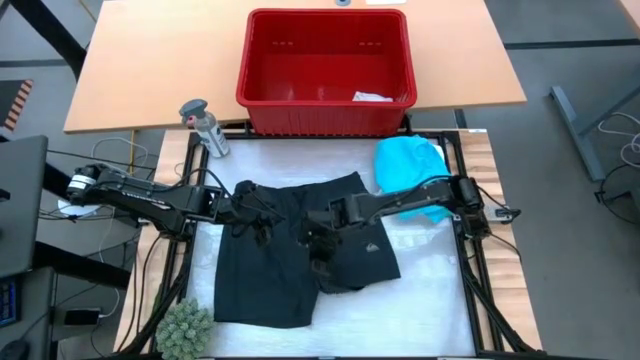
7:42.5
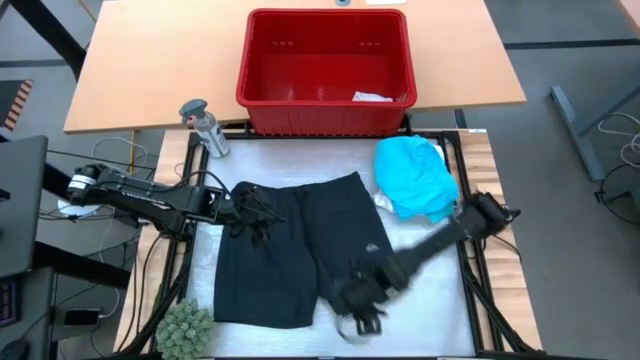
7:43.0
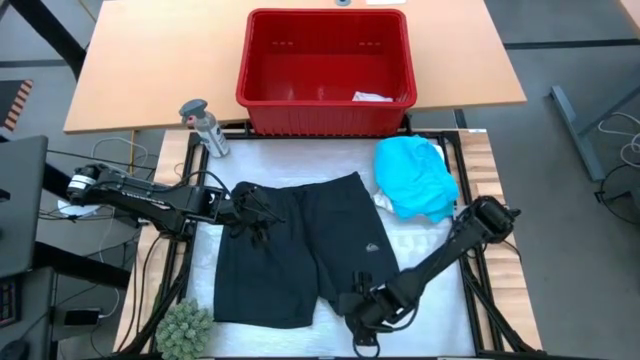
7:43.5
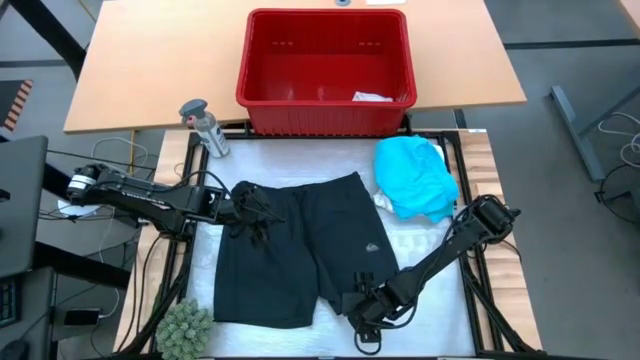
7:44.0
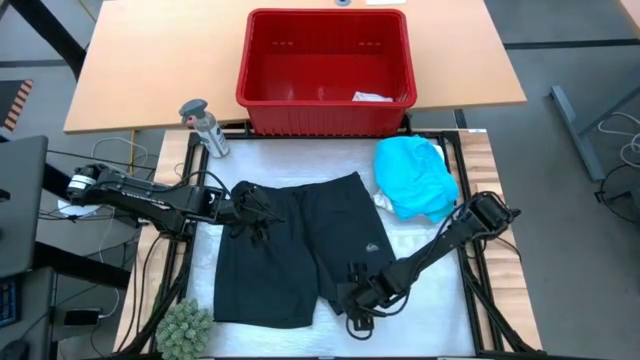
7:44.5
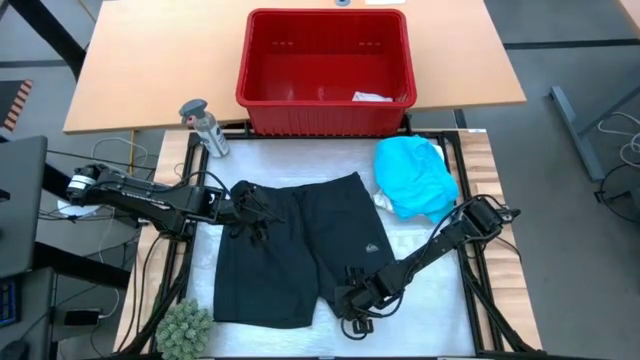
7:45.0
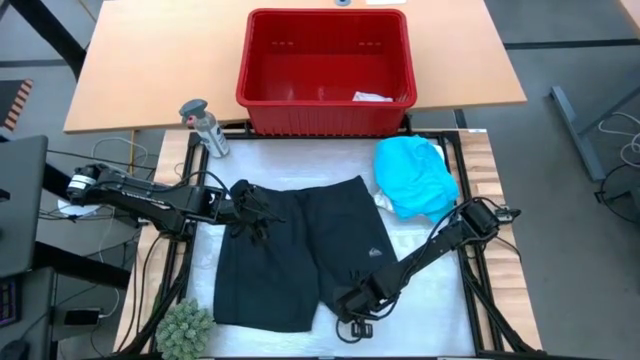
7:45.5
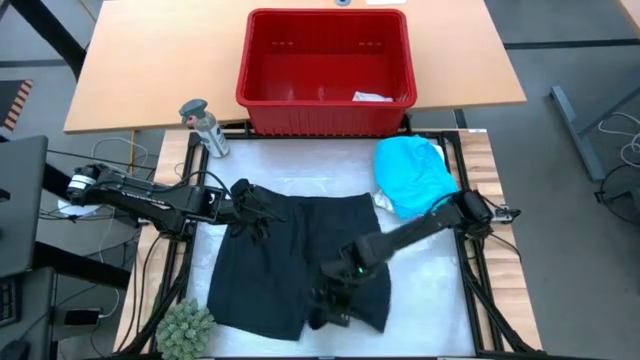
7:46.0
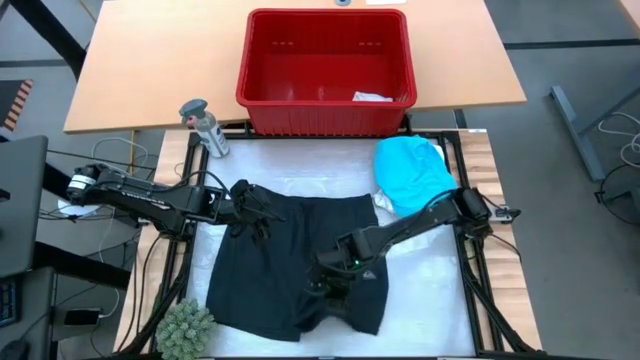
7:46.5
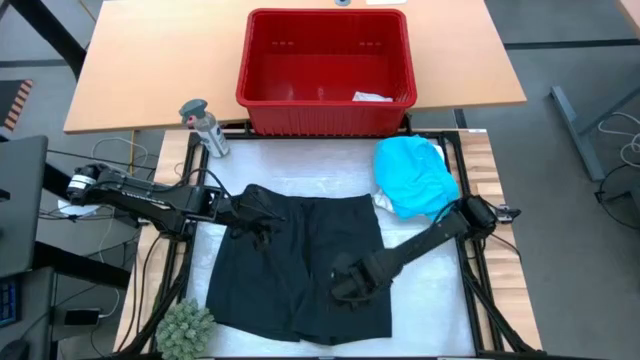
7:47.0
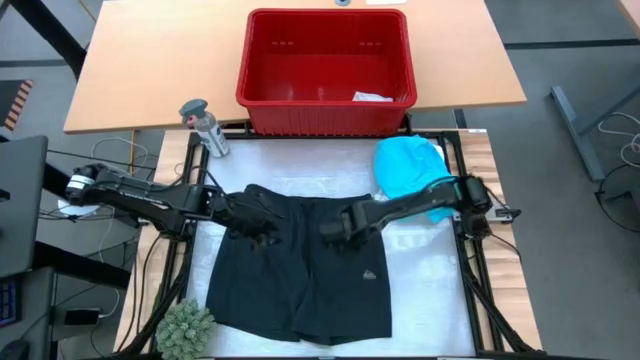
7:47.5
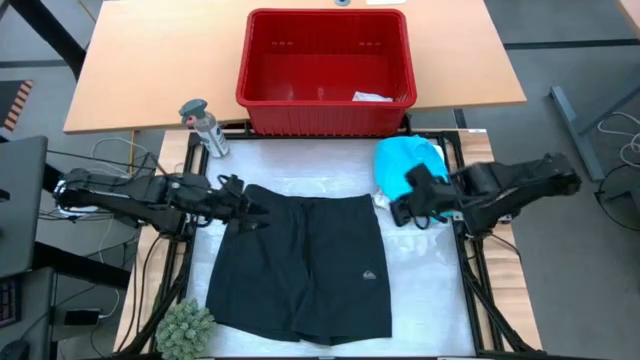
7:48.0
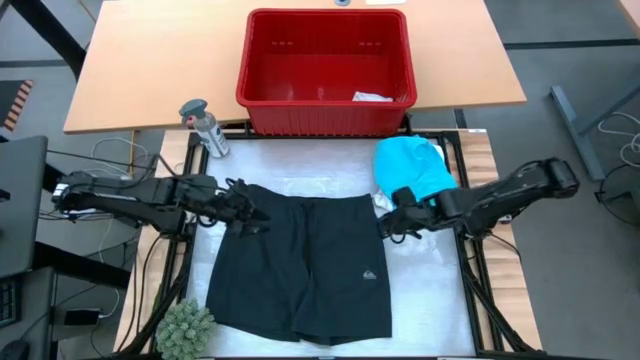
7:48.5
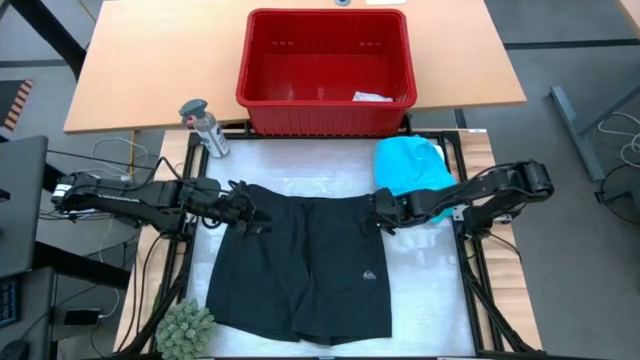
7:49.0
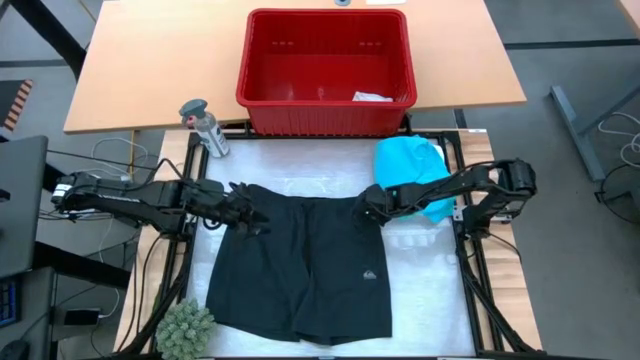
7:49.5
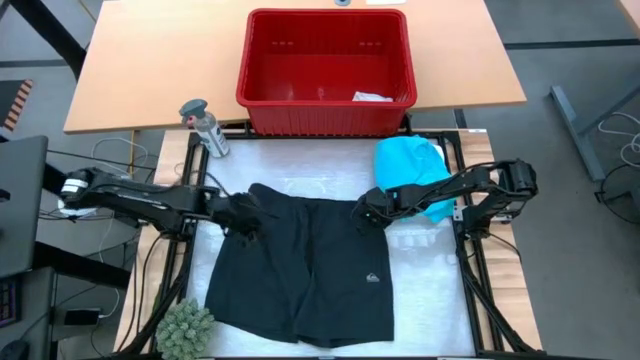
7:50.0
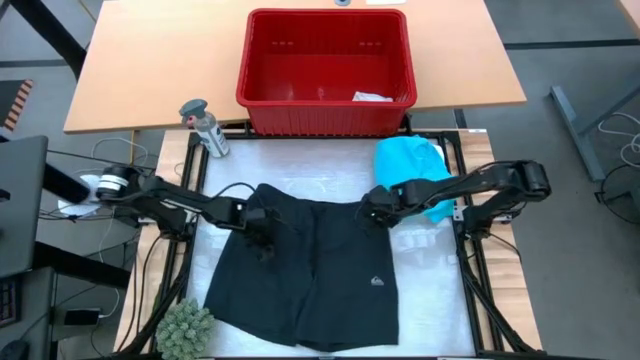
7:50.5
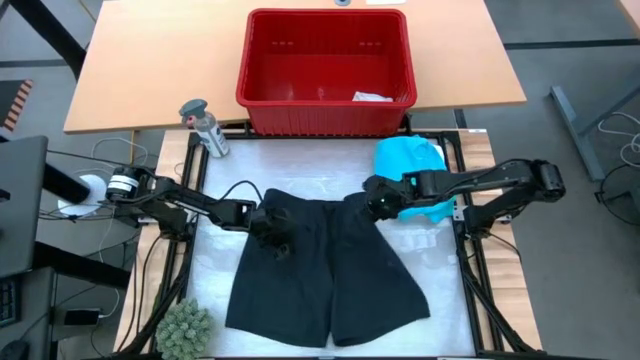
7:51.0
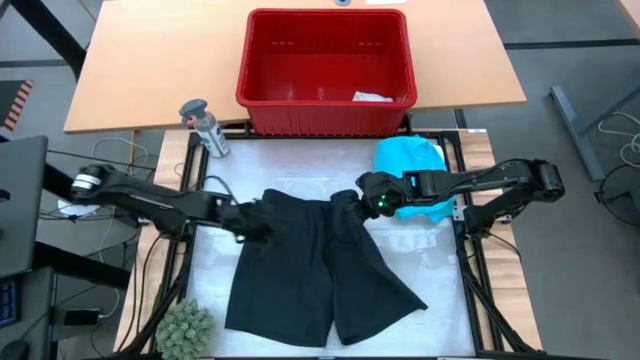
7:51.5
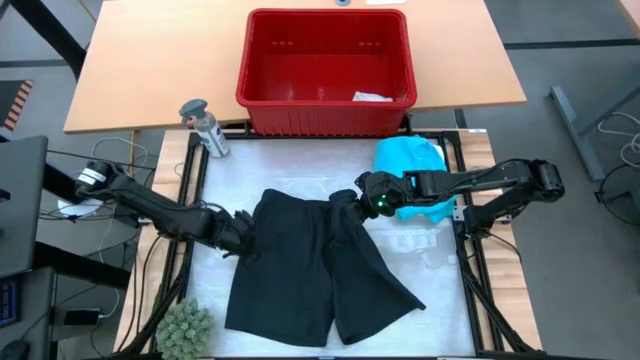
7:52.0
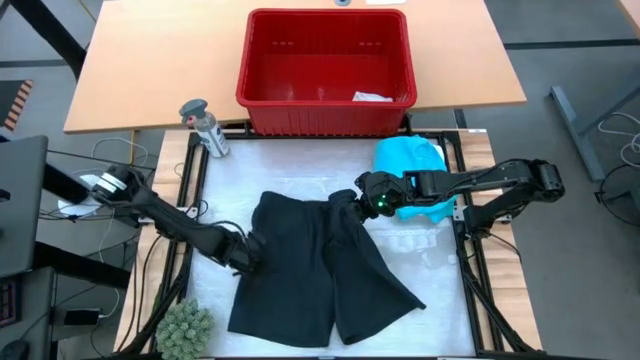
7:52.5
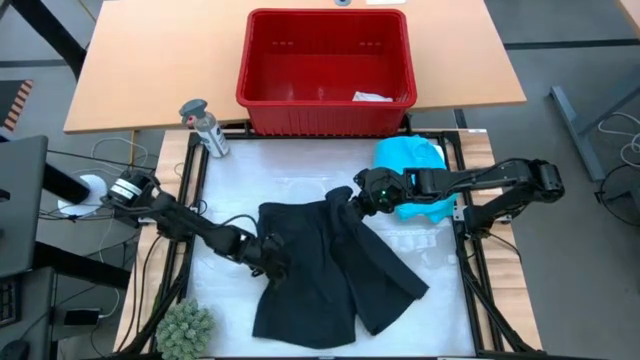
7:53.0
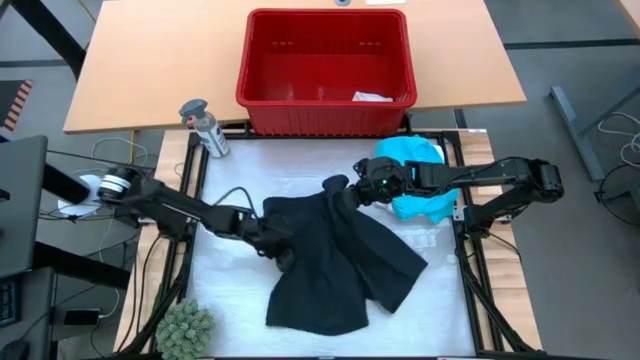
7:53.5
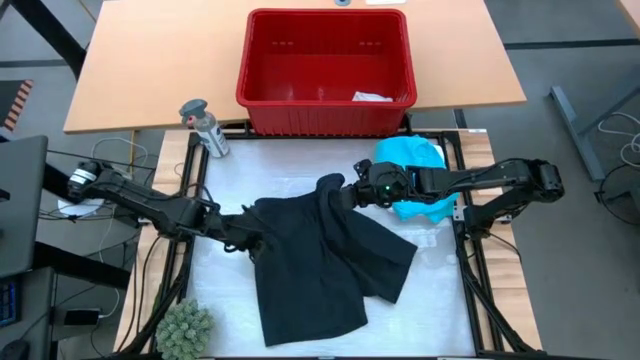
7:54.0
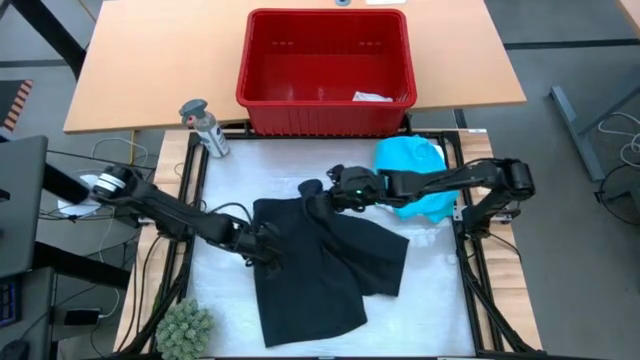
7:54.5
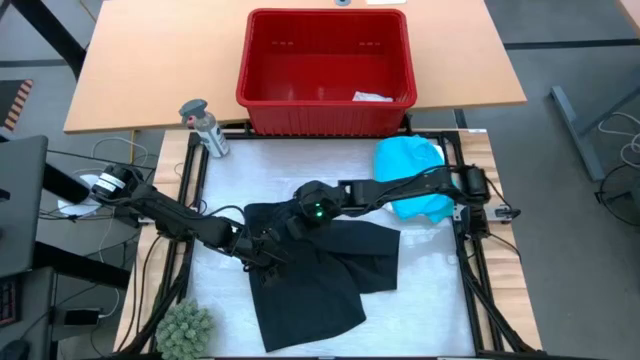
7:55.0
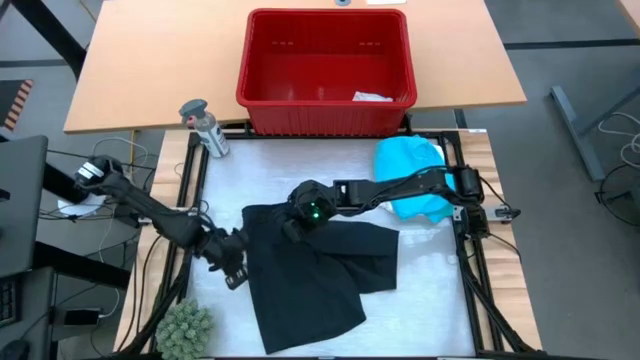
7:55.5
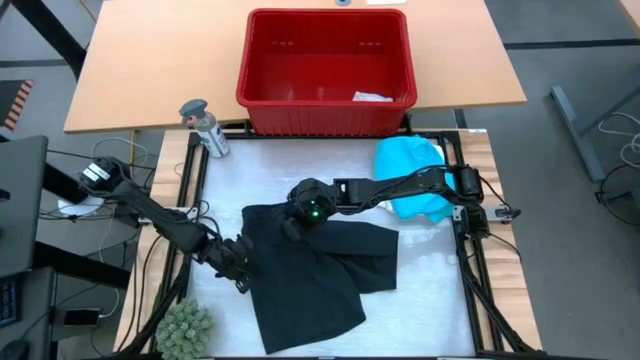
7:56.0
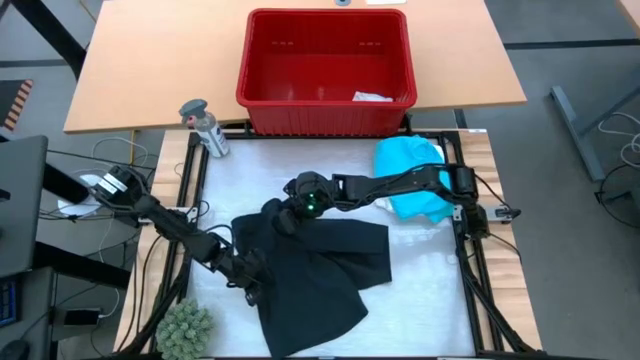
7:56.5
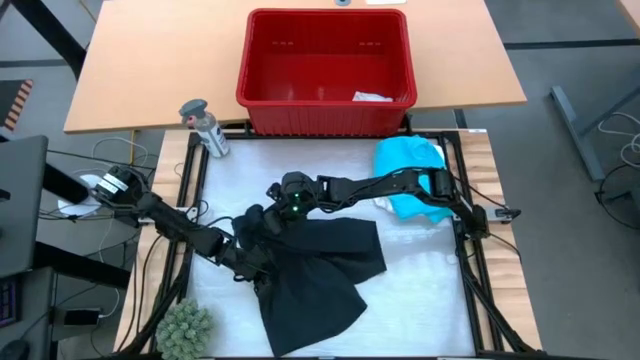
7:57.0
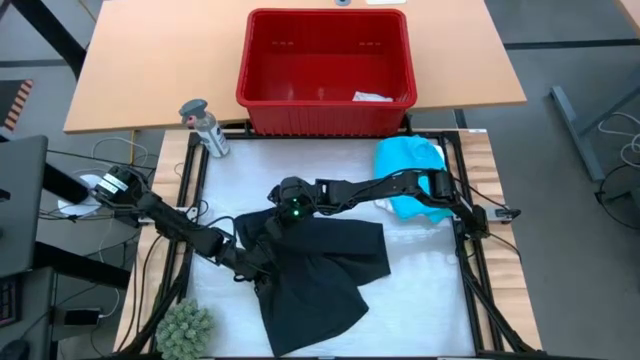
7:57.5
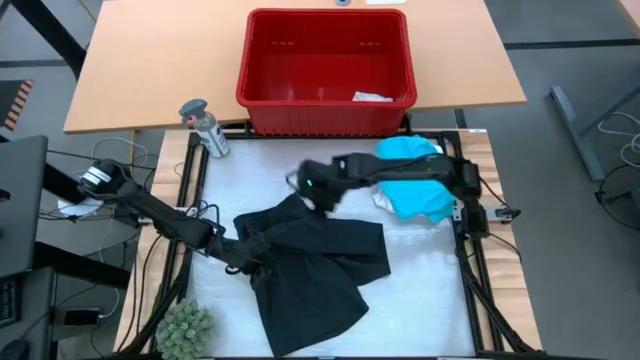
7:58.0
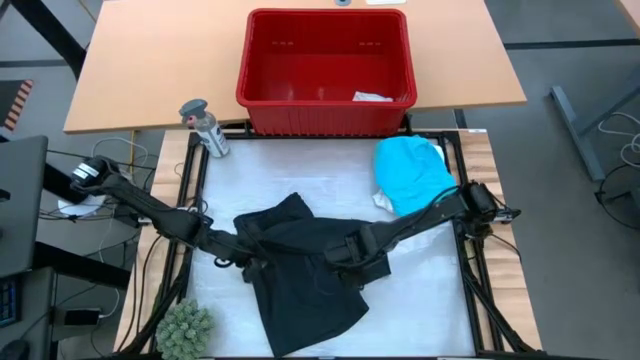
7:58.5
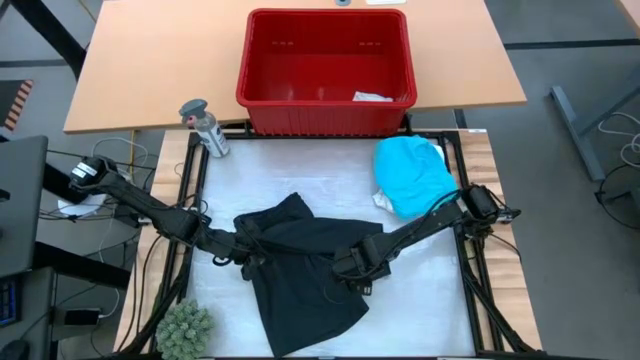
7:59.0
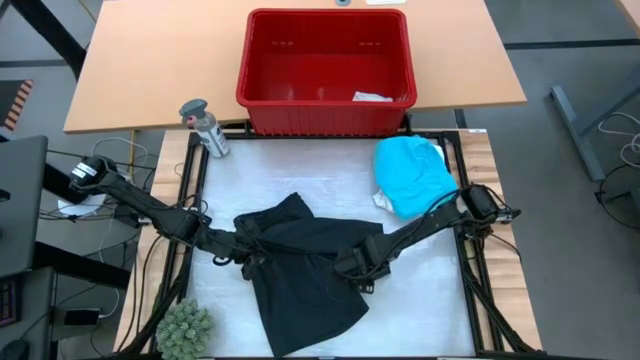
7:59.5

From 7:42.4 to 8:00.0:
Task: Fold Laundry from Bin
Fold the black shorts

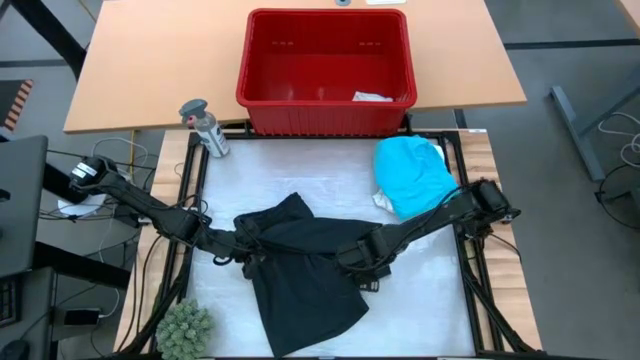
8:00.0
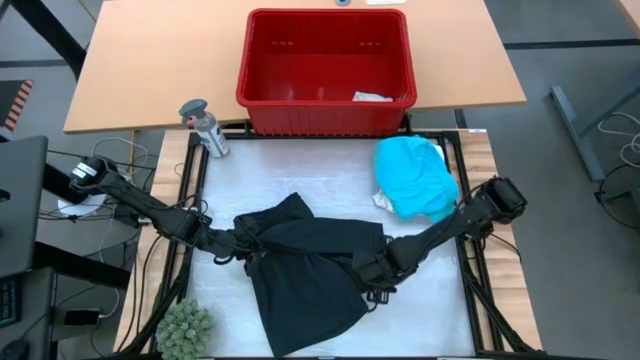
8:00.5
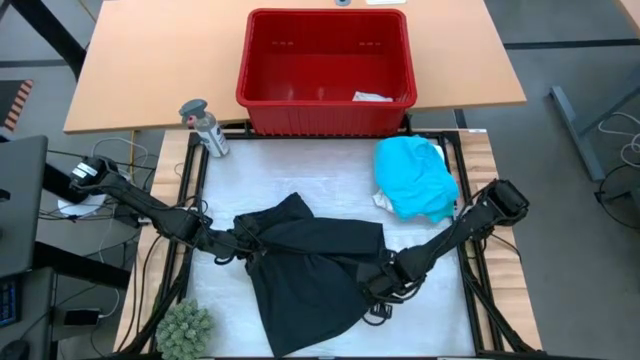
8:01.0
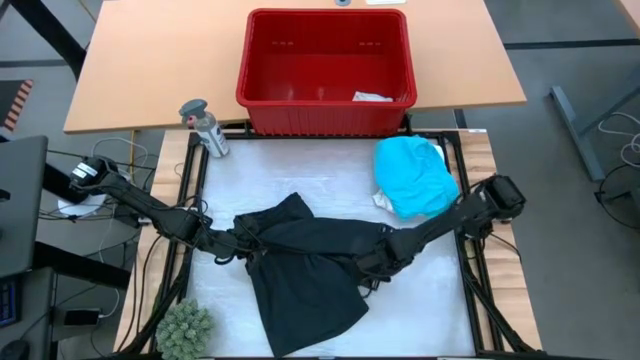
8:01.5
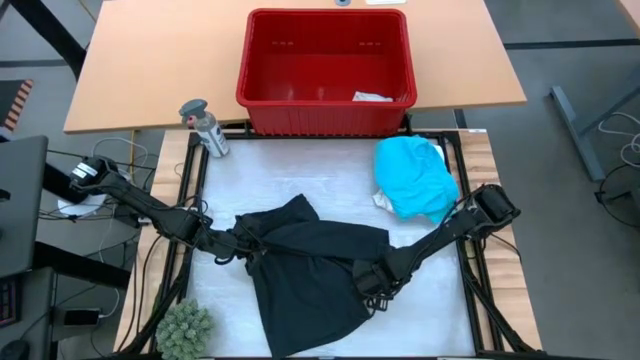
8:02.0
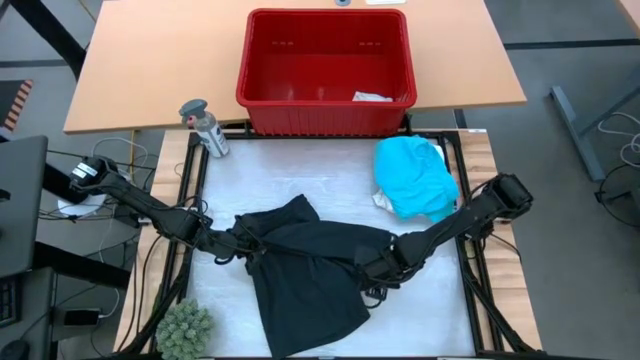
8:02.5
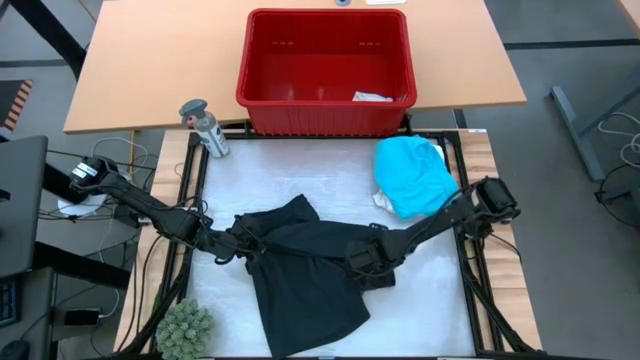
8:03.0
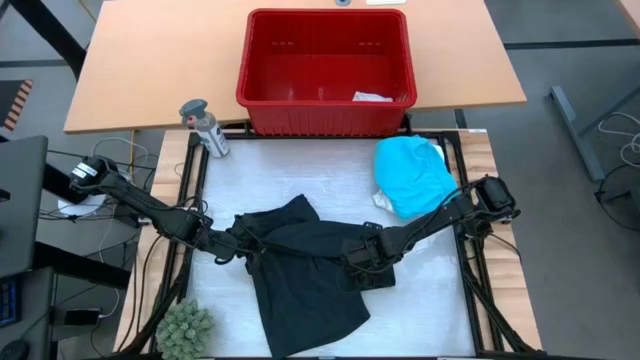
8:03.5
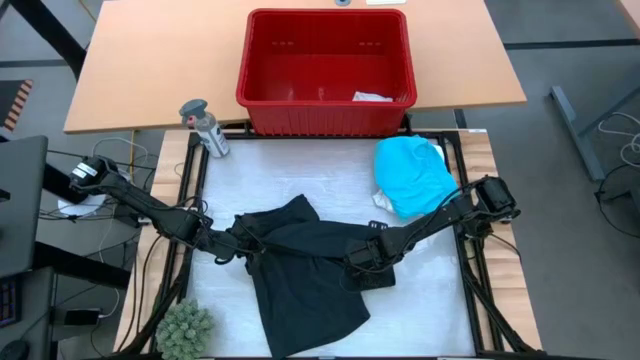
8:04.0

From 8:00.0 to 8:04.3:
Fold the black shorts
